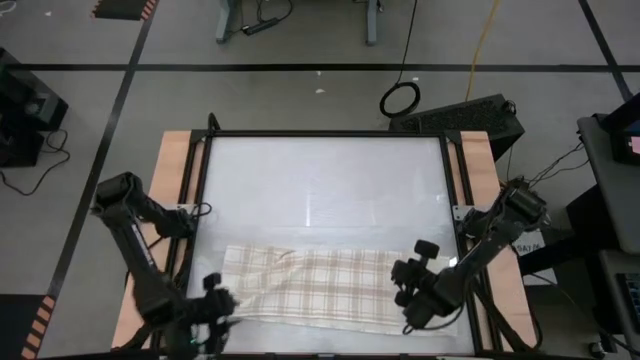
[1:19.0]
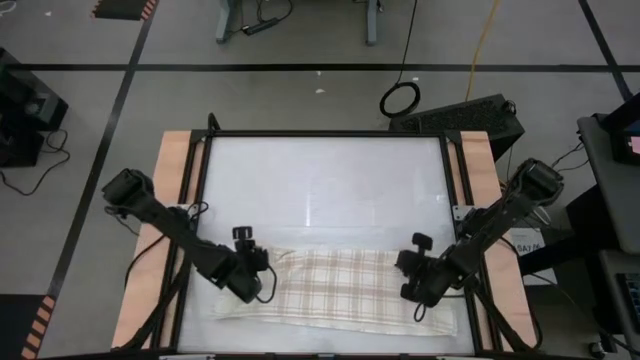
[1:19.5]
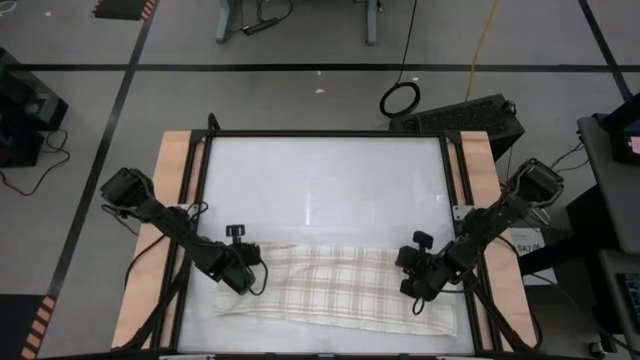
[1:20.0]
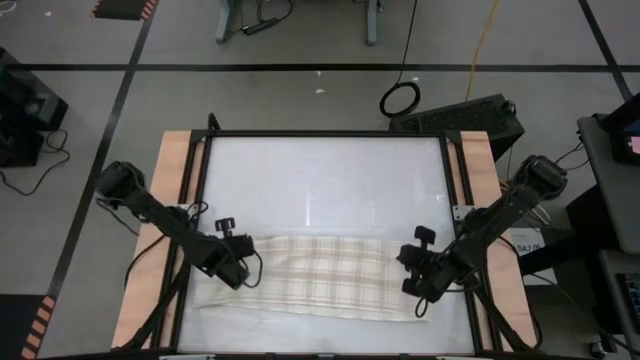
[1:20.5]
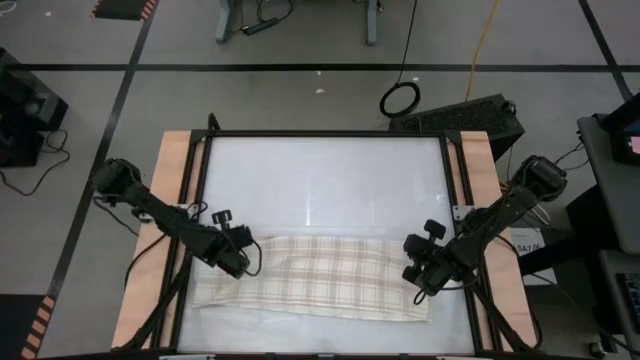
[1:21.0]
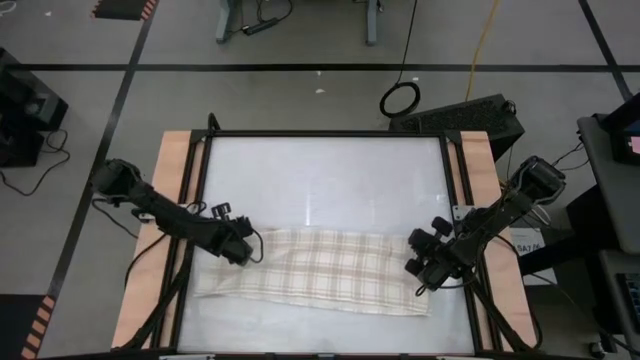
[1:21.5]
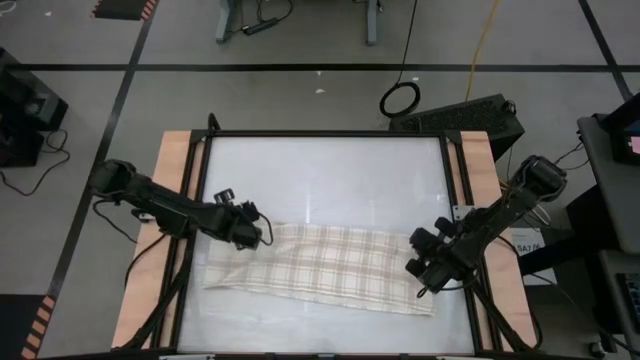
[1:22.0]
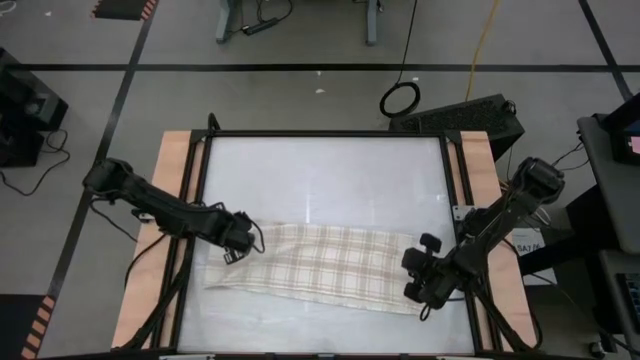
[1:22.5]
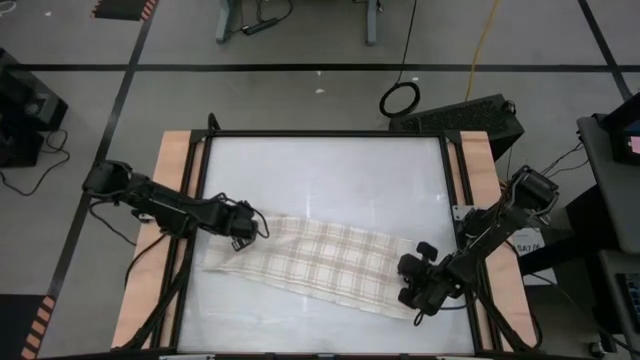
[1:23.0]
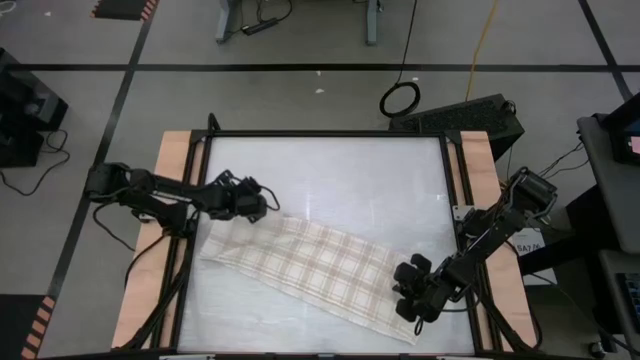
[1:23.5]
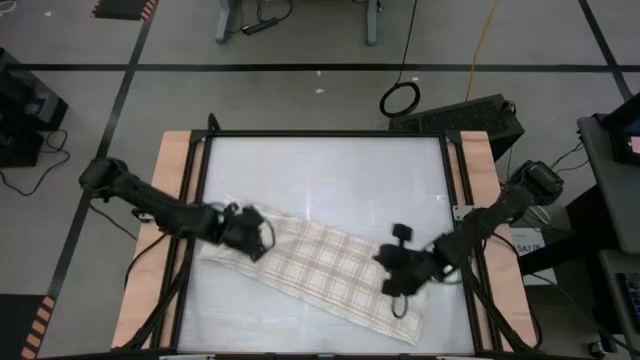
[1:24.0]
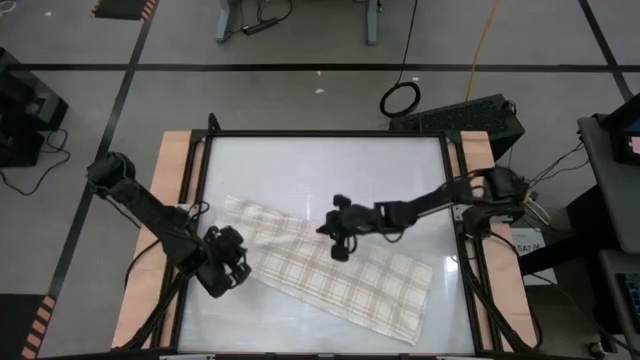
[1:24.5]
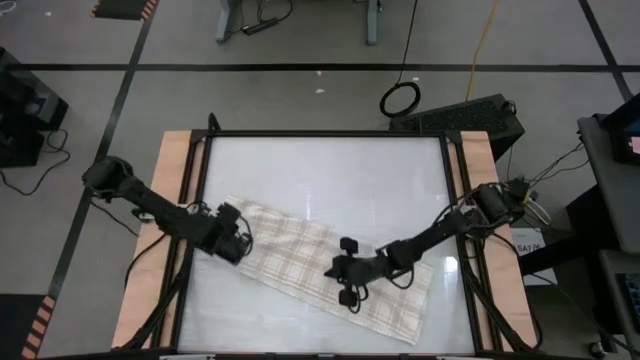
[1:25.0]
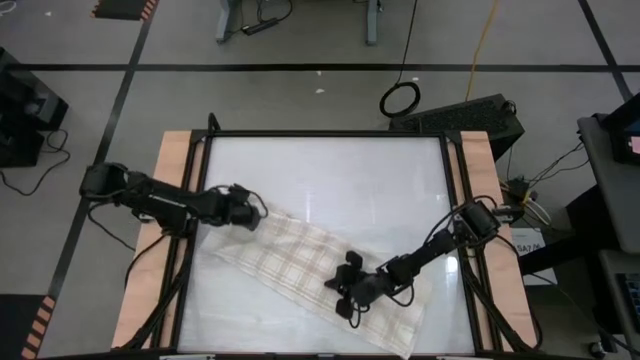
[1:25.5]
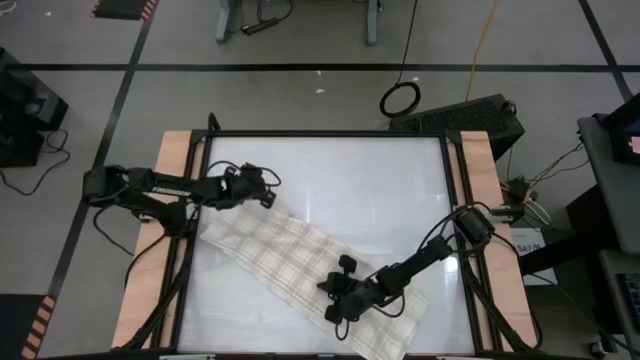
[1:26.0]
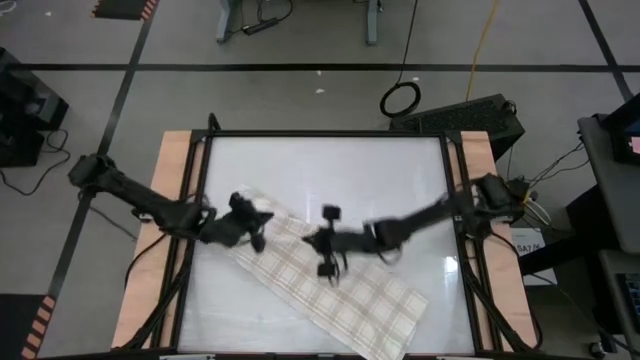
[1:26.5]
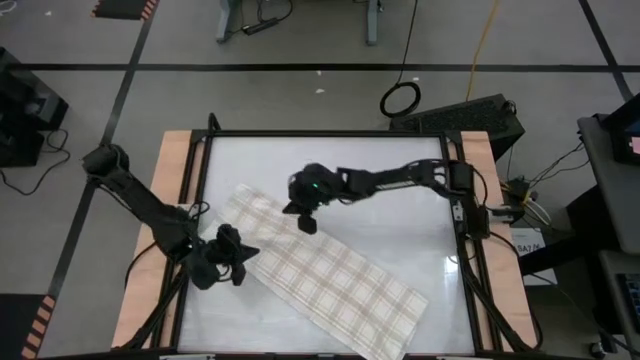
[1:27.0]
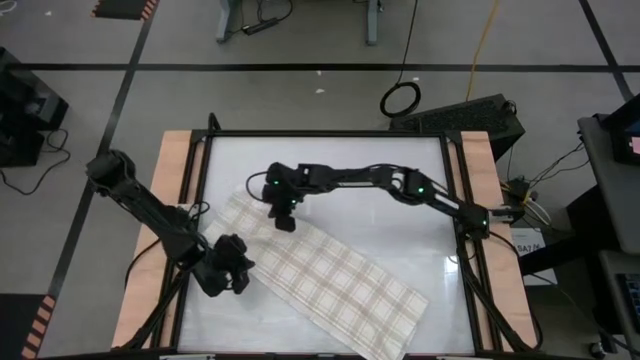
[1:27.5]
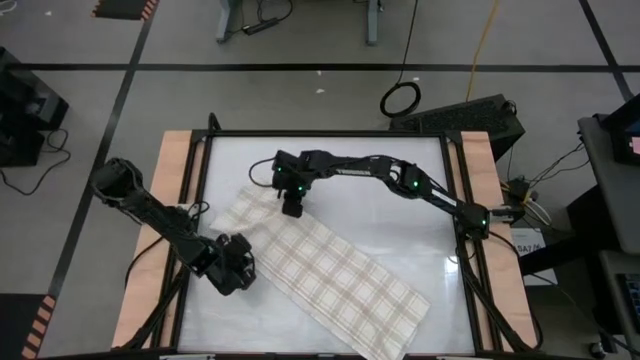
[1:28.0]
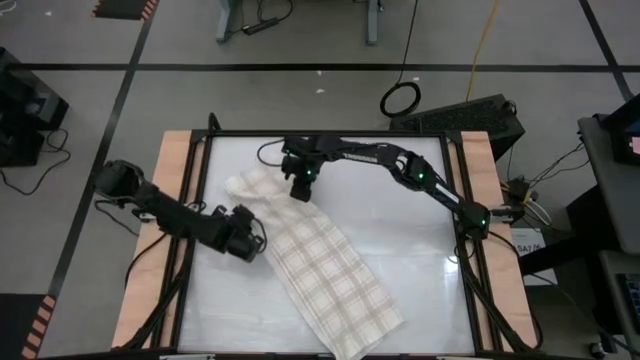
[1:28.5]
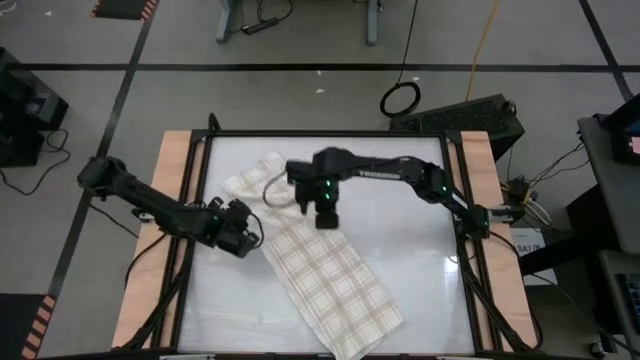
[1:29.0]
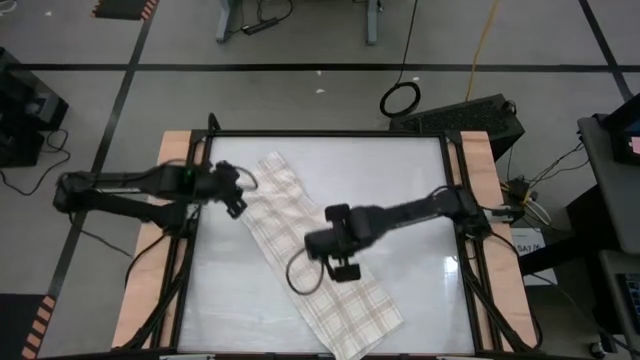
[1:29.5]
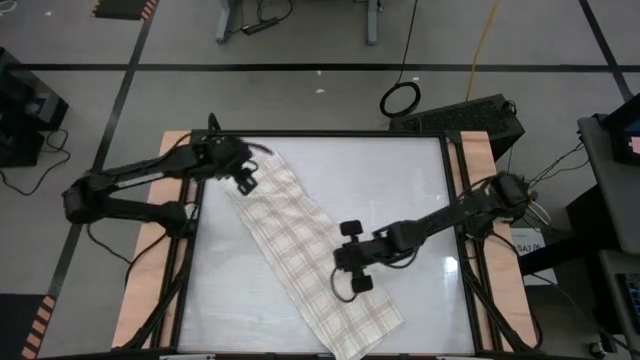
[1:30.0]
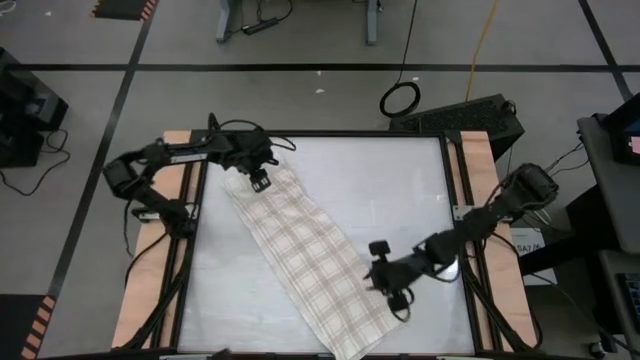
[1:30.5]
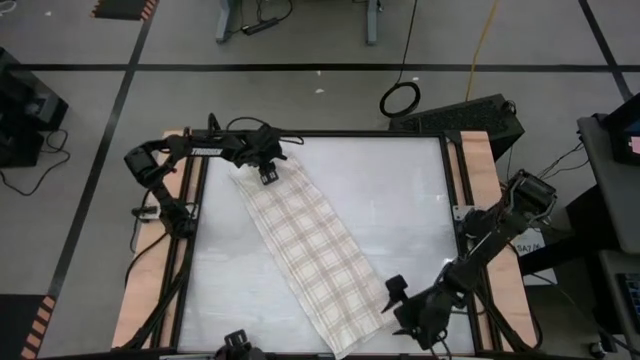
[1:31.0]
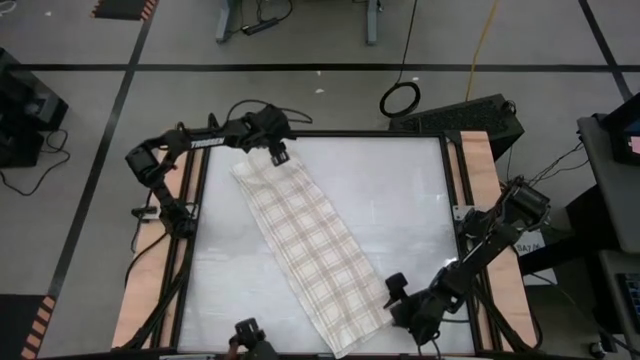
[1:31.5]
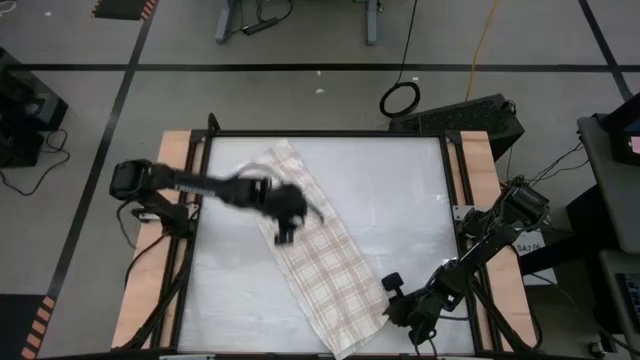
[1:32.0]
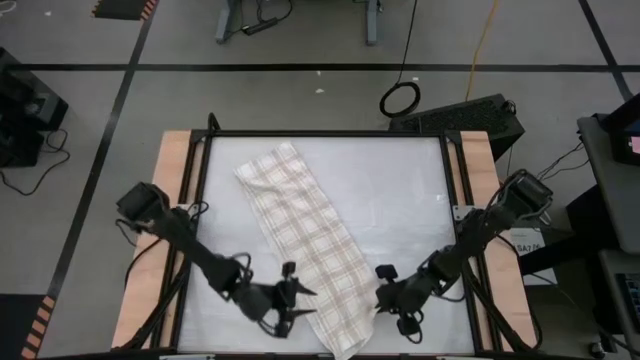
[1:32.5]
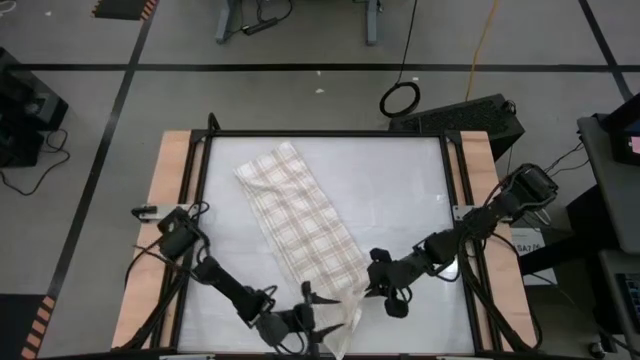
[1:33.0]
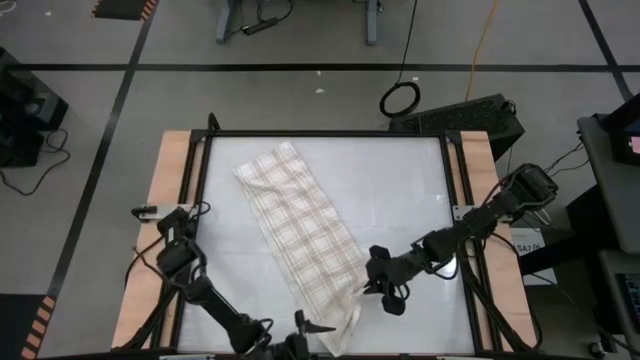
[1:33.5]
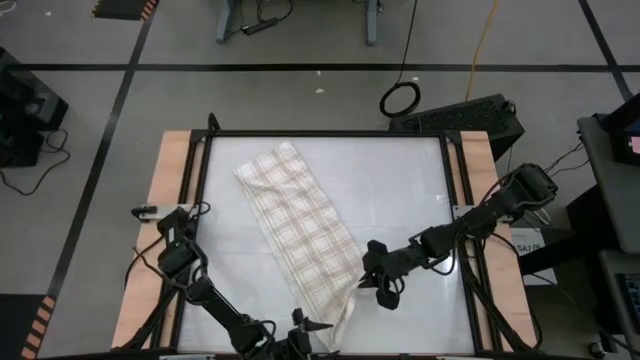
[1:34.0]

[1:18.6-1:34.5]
Task: Roll towel
Roll the white-brown patterned towel

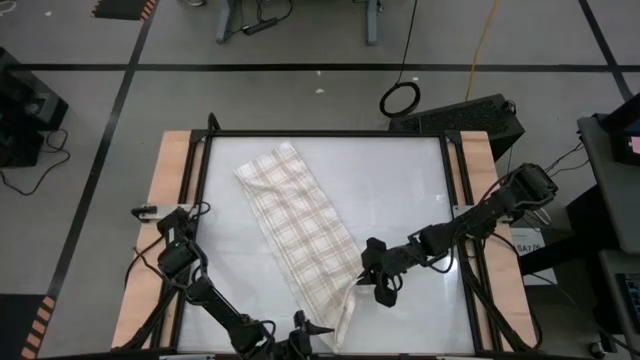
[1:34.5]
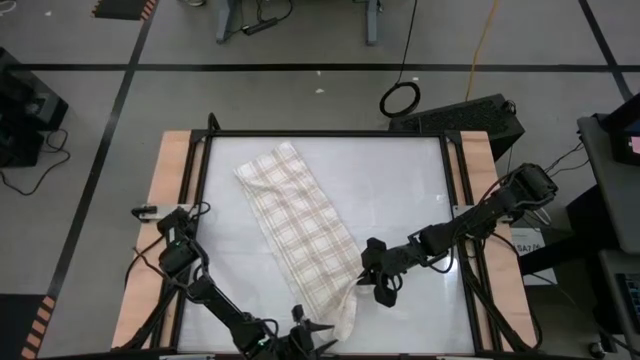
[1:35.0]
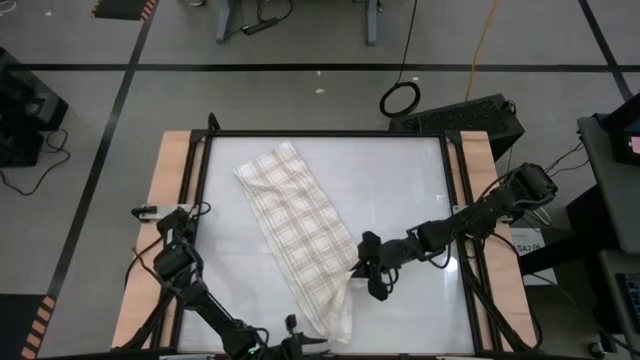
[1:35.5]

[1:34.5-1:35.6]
Roll the white-brown patterned towel

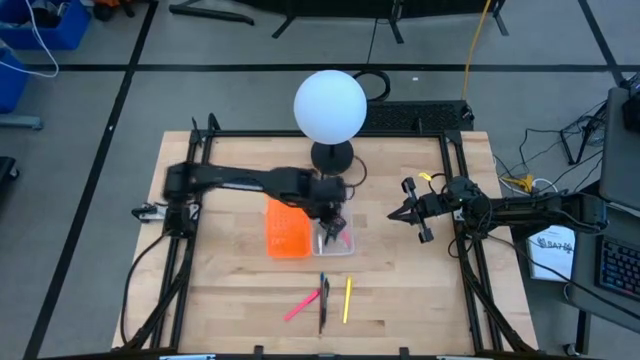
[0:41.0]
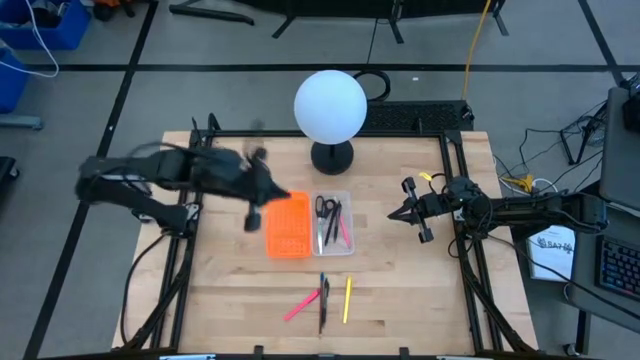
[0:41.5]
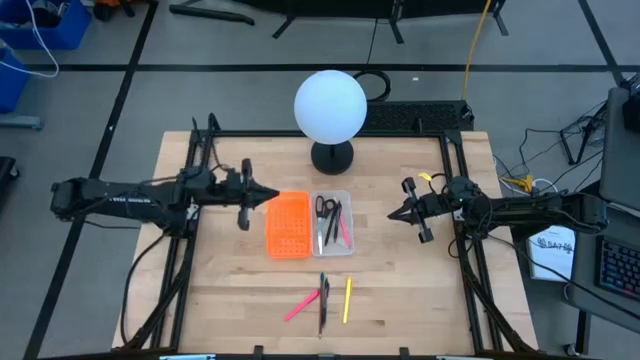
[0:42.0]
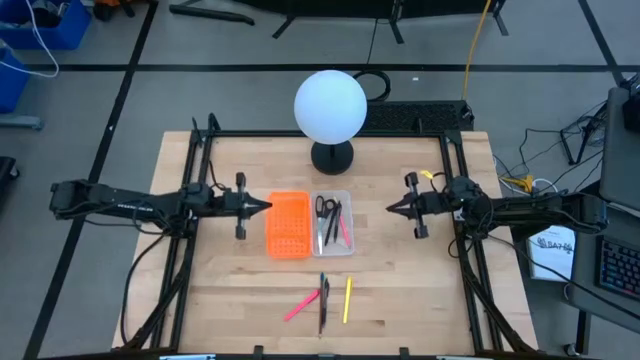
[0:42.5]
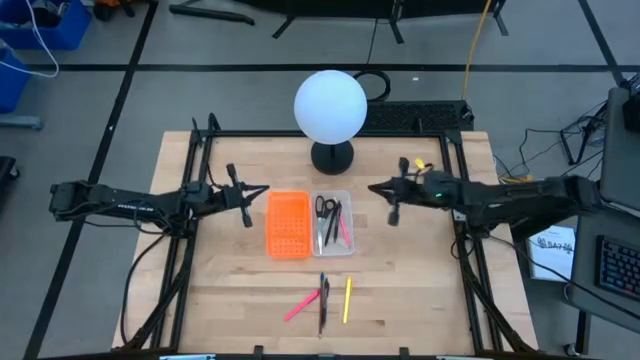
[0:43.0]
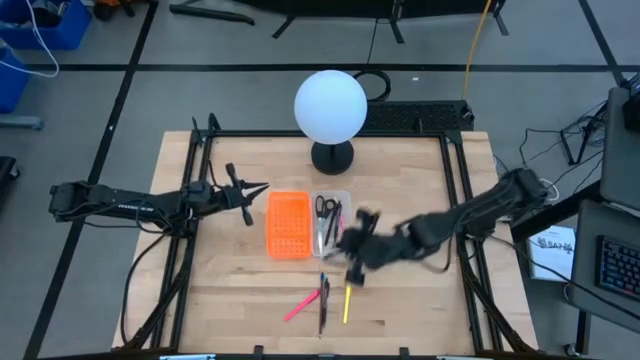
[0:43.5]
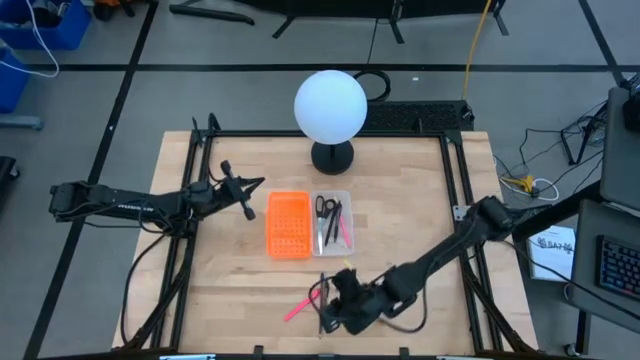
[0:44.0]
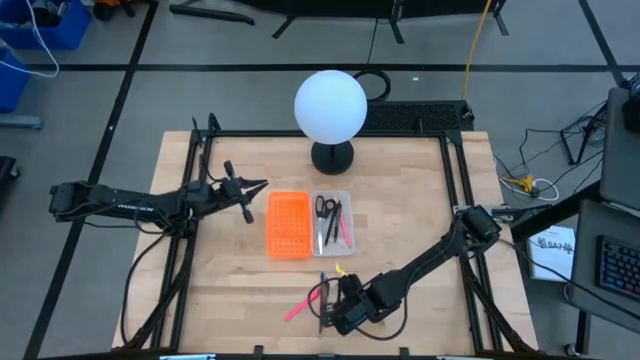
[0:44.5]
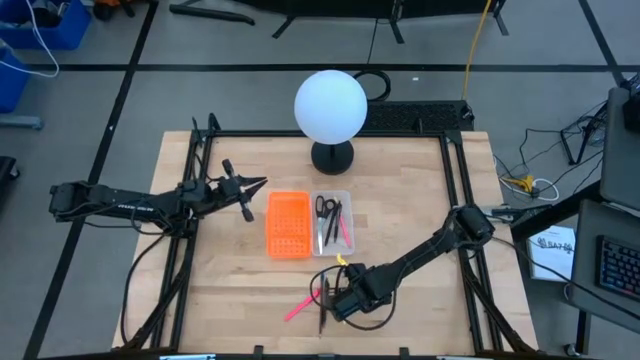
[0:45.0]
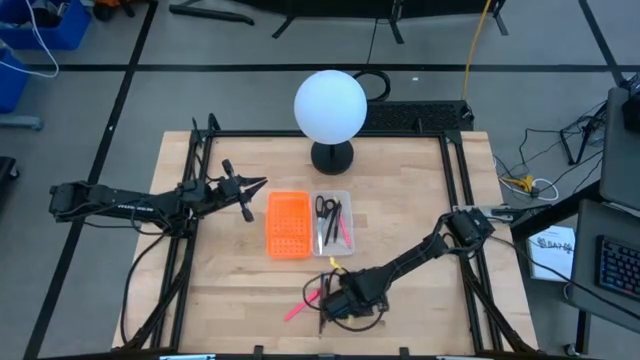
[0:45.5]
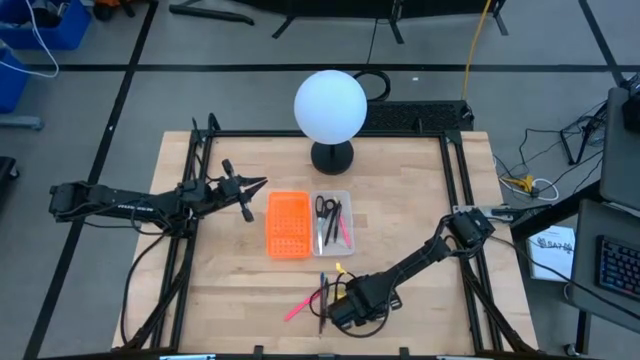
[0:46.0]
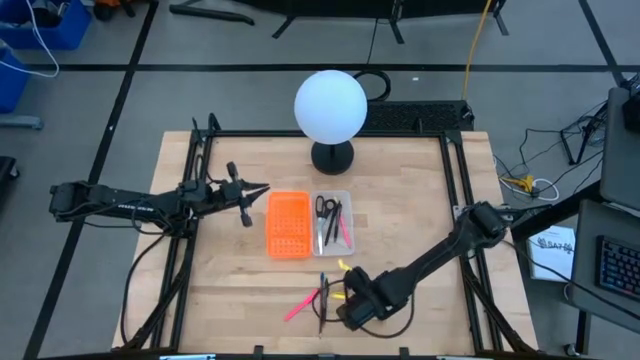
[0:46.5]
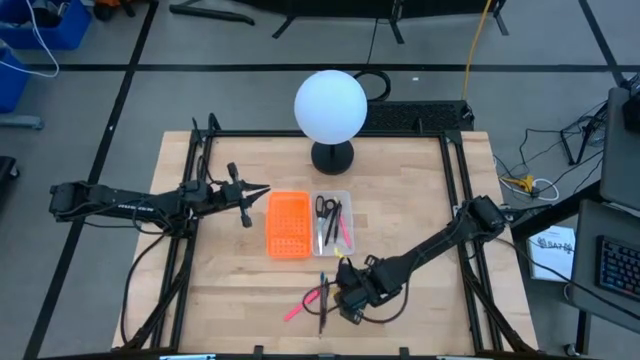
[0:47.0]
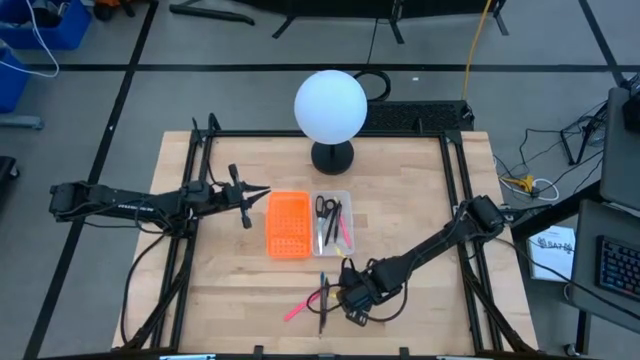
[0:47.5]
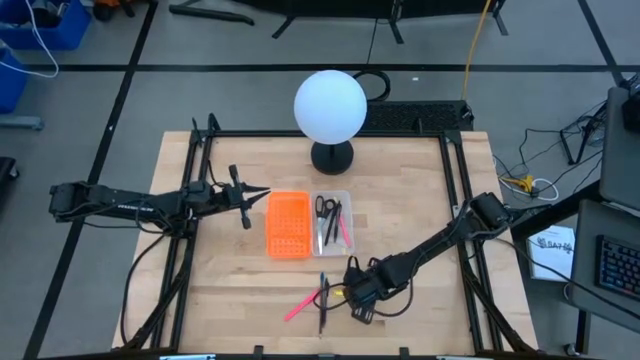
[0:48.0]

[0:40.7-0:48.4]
Task: Pick & place school supplies into a supply box
Put the yellow highlighter into the supply box
